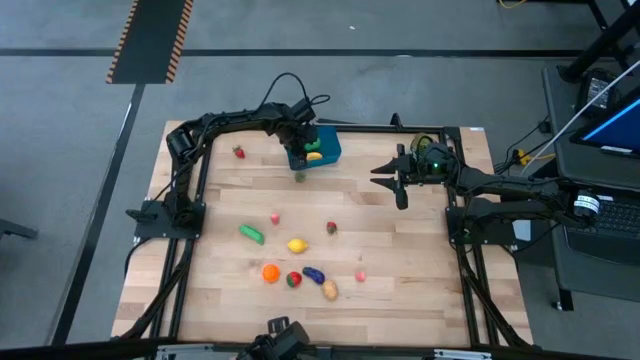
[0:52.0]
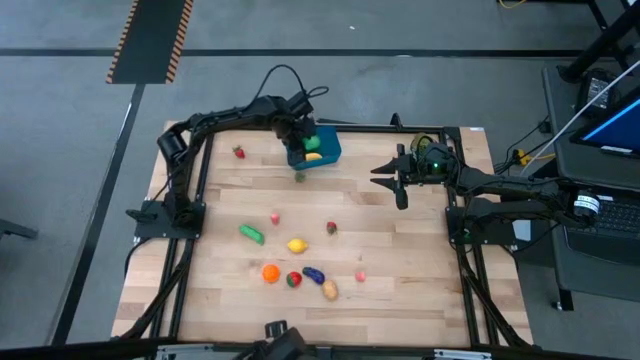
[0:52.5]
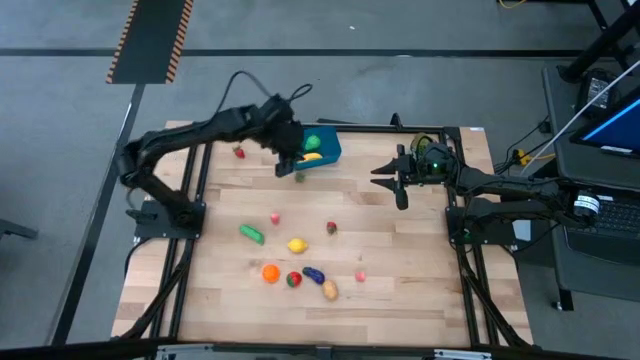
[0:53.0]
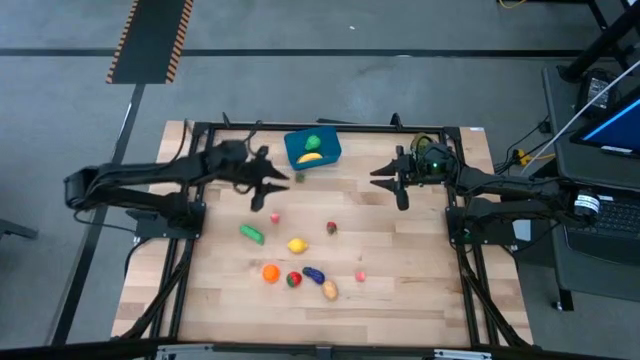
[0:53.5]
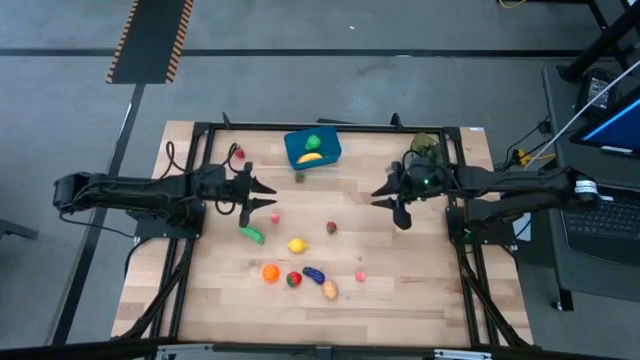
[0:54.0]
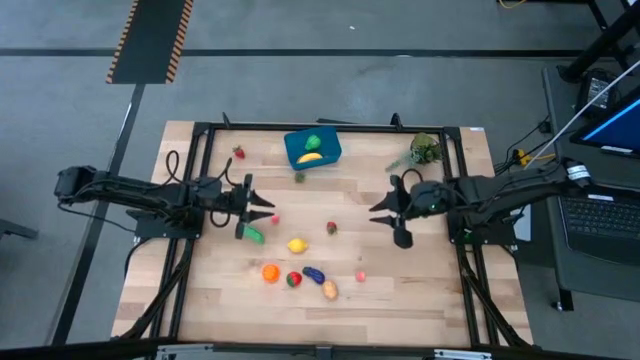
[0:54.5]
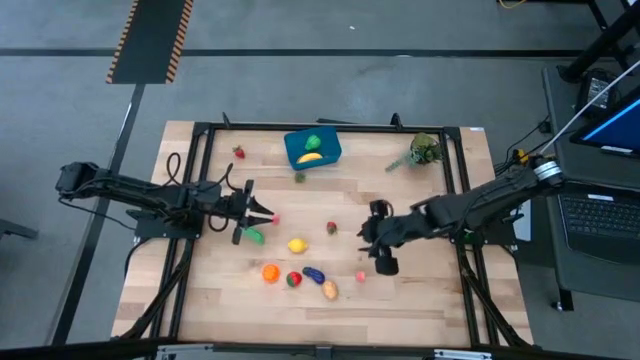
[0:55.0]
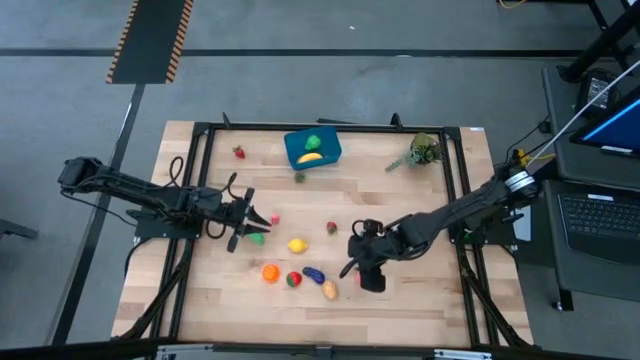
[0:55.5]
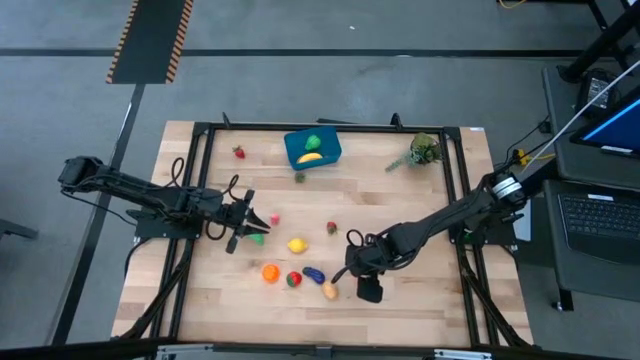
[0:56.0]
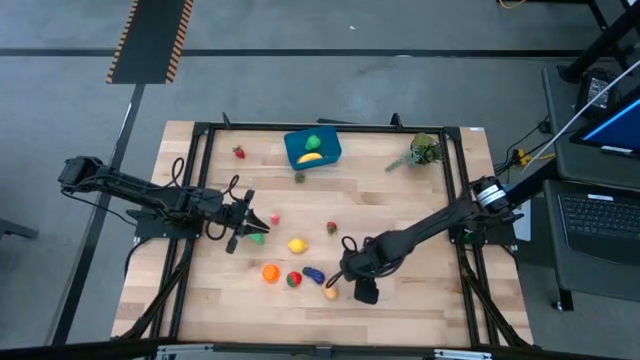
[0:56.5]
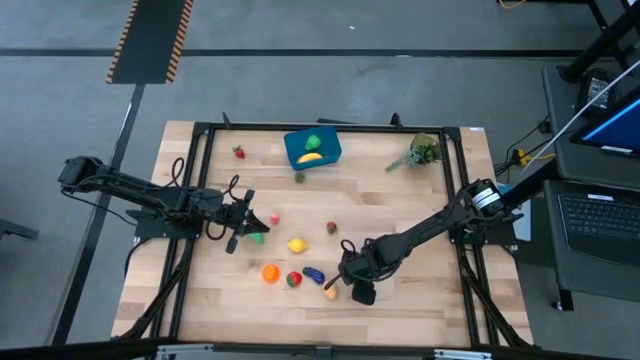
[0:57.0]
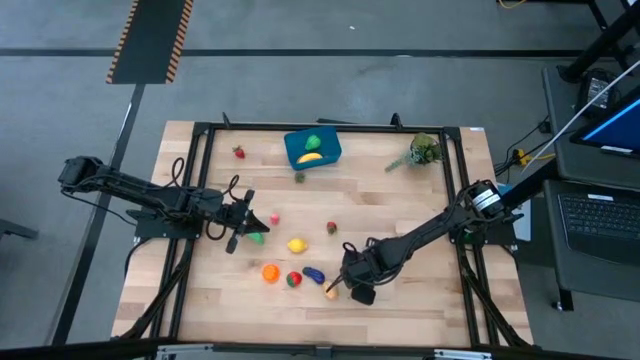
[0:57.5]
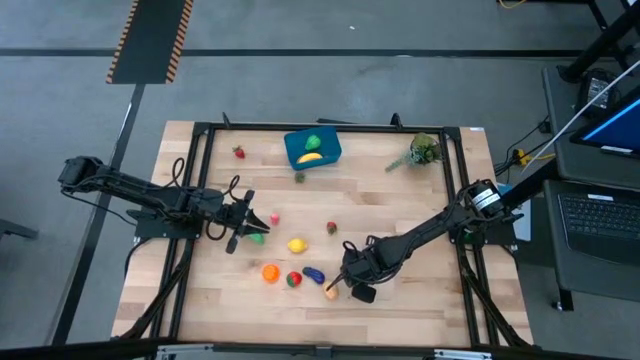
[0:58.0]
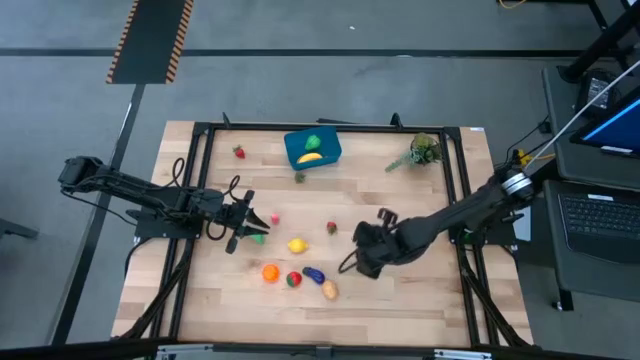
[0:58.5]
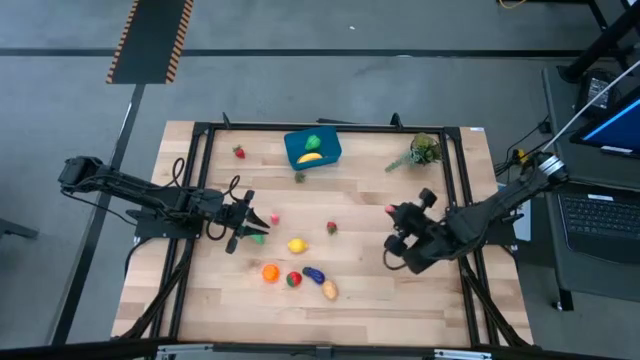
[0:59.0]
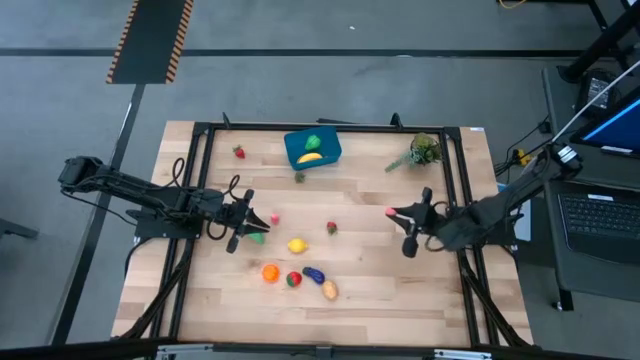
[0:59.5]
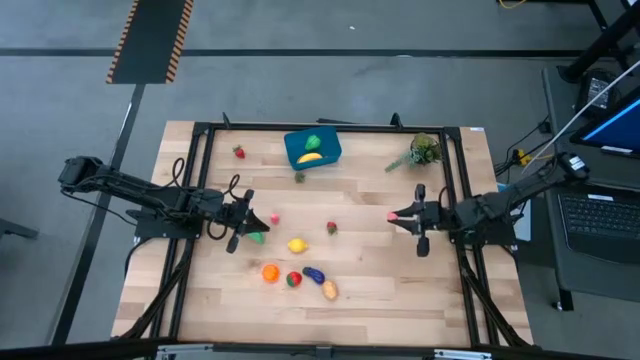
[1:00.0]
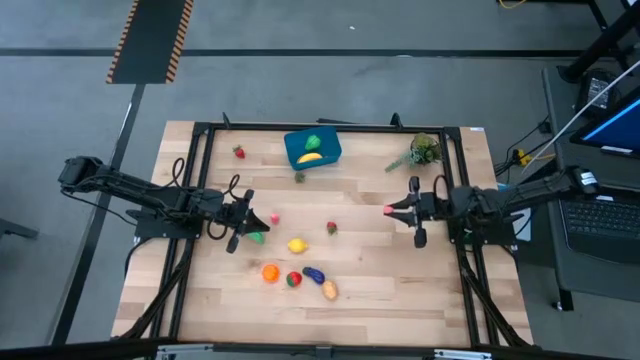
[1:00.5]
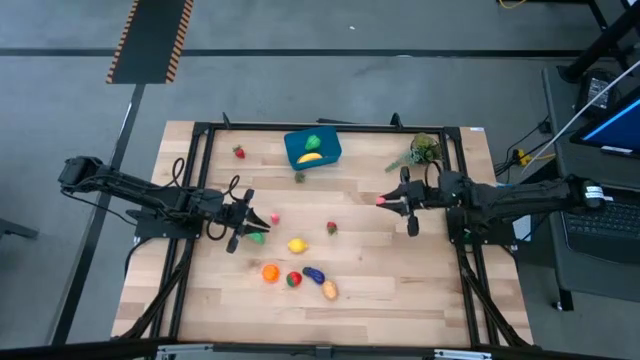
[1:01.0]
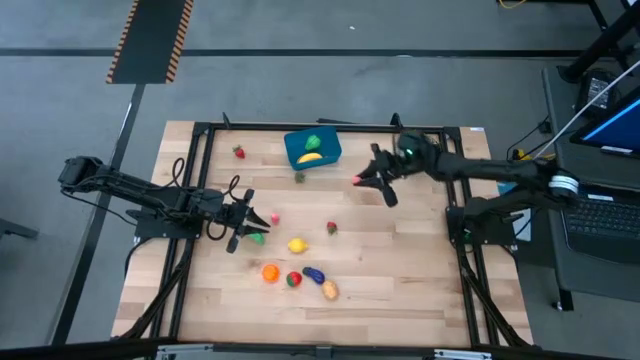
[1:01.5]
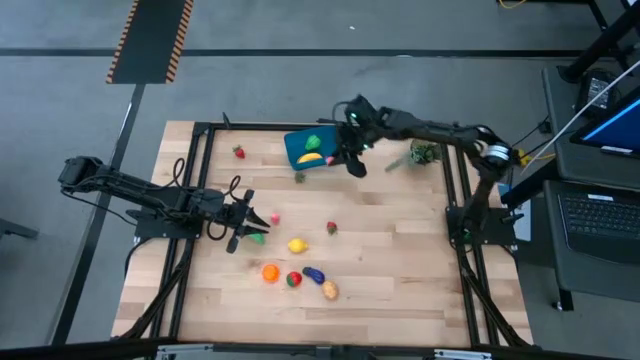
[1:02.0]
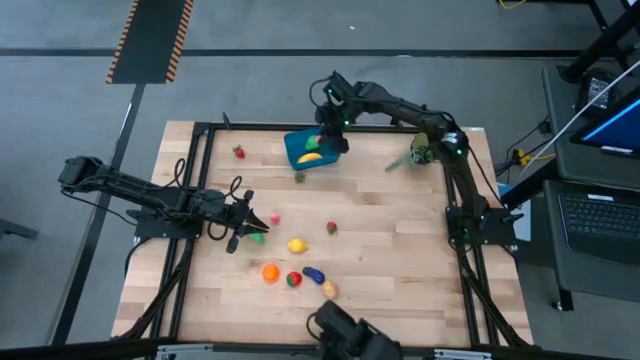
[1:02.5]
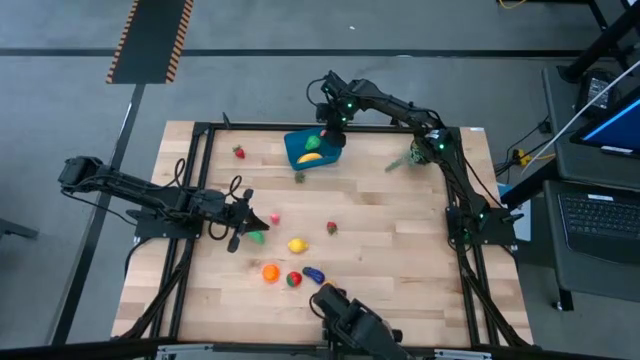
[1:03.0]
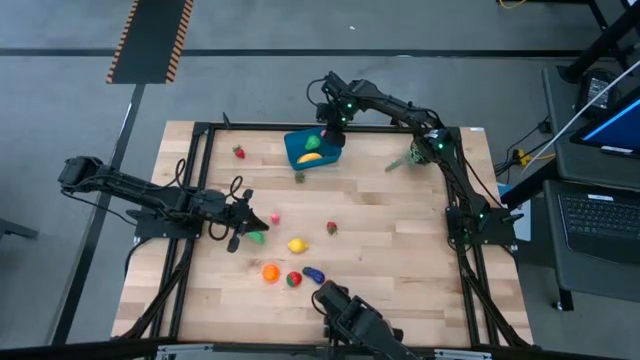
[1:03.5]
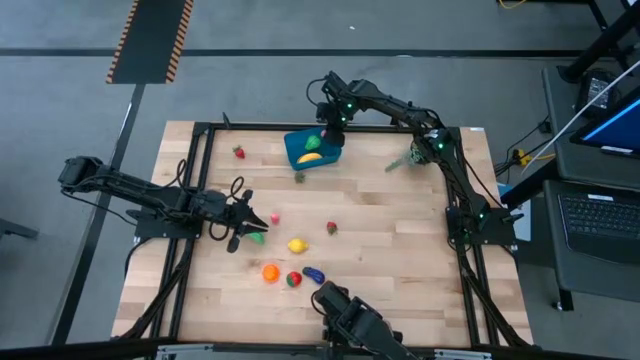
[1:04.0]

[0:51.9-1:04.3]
Task: Pick and placing Produce into tupperware
Put the peach into the blue bin

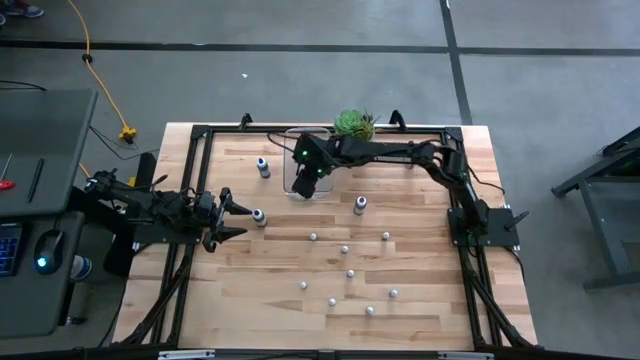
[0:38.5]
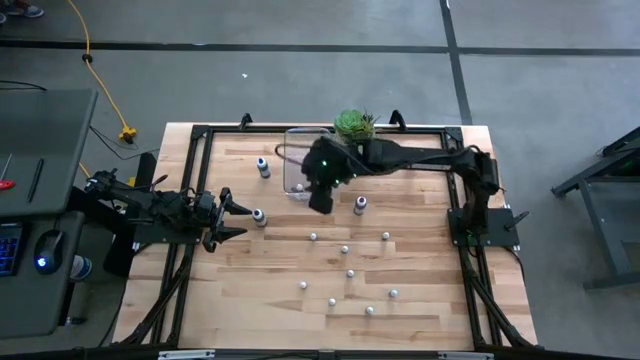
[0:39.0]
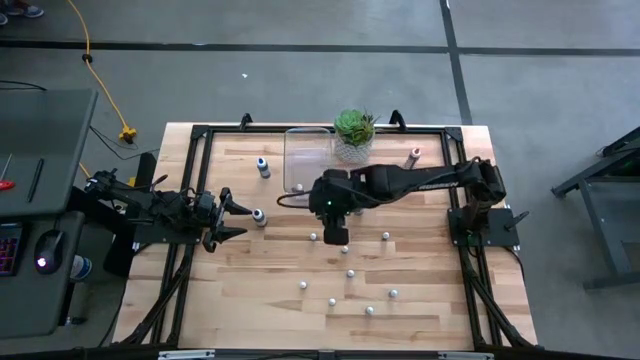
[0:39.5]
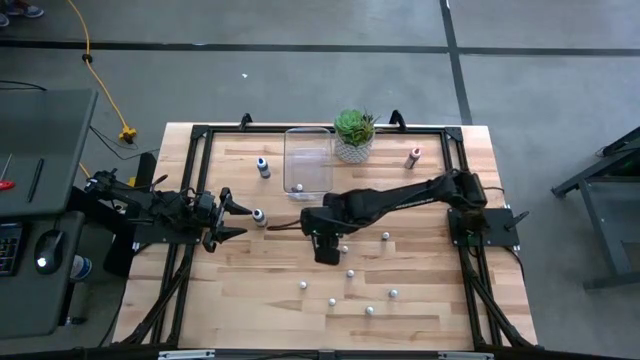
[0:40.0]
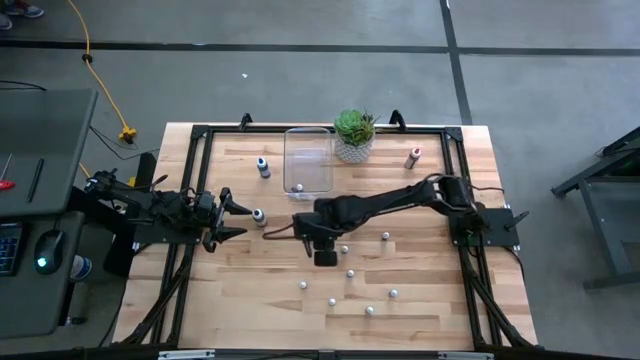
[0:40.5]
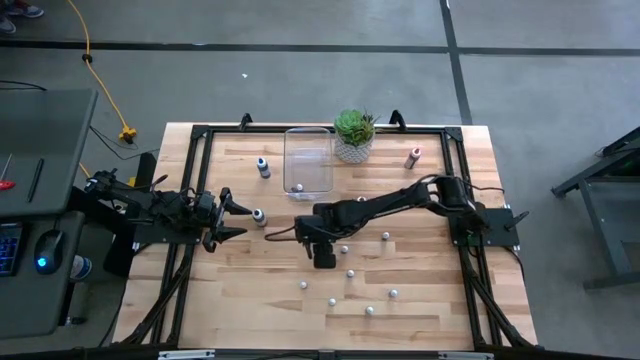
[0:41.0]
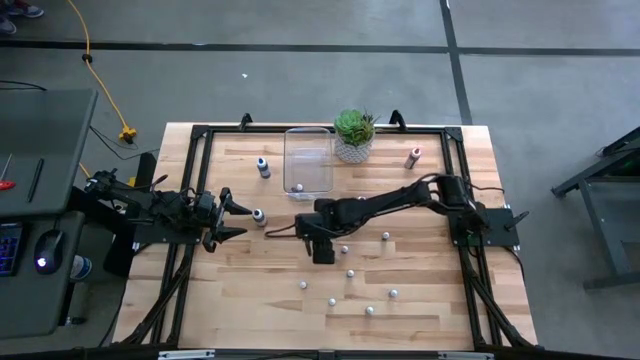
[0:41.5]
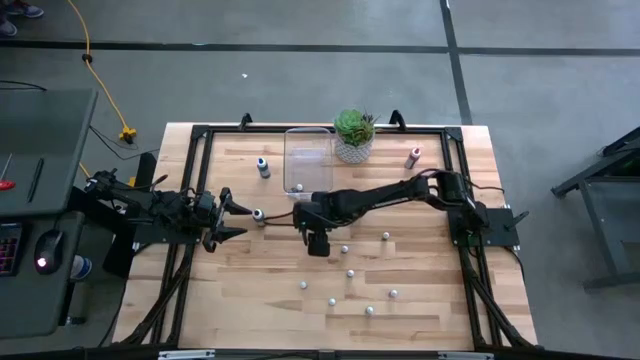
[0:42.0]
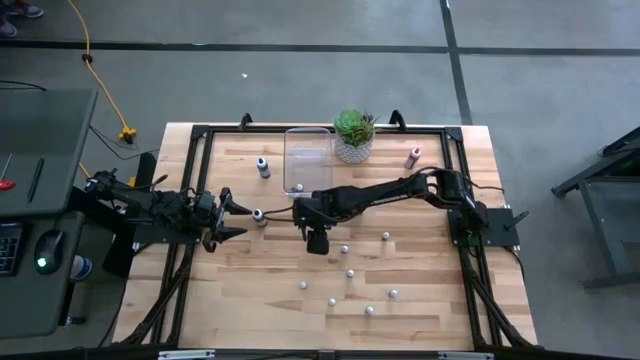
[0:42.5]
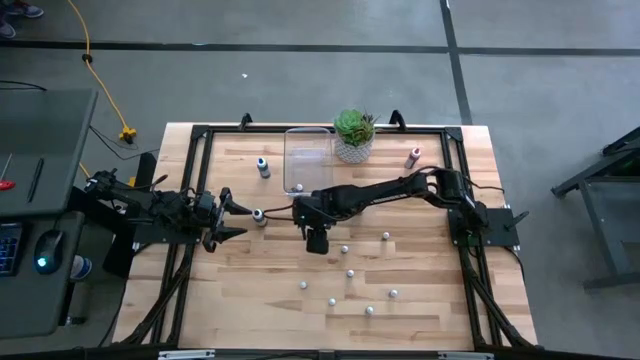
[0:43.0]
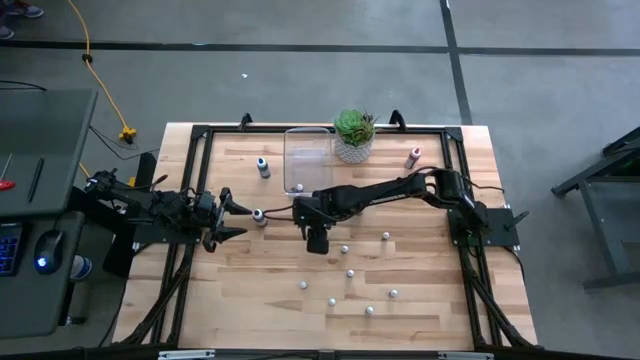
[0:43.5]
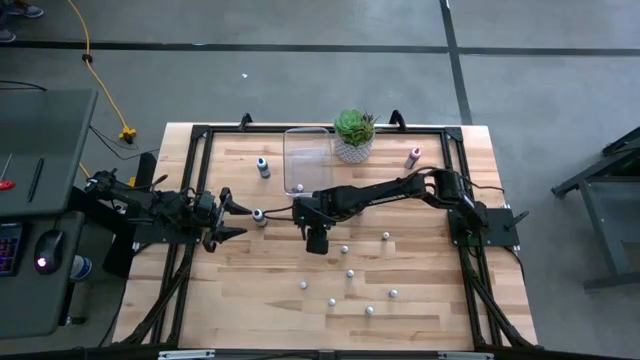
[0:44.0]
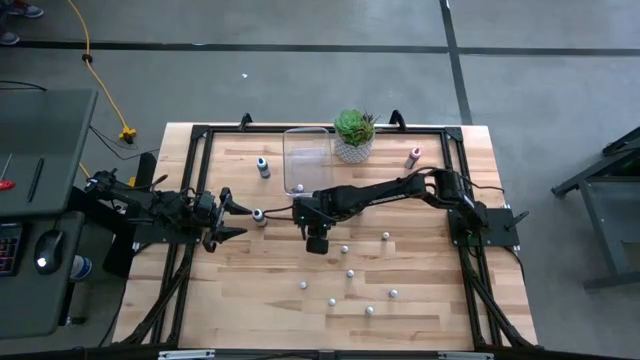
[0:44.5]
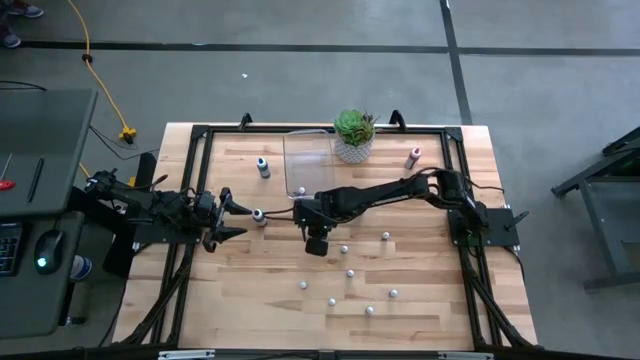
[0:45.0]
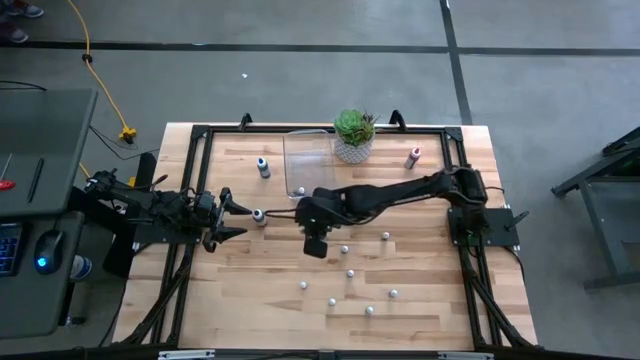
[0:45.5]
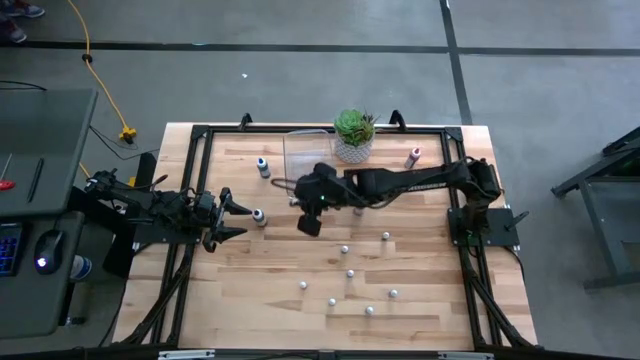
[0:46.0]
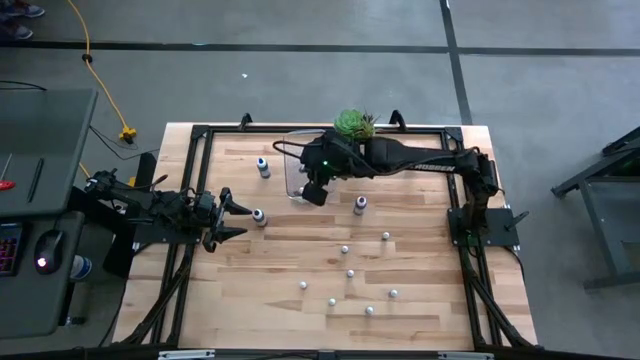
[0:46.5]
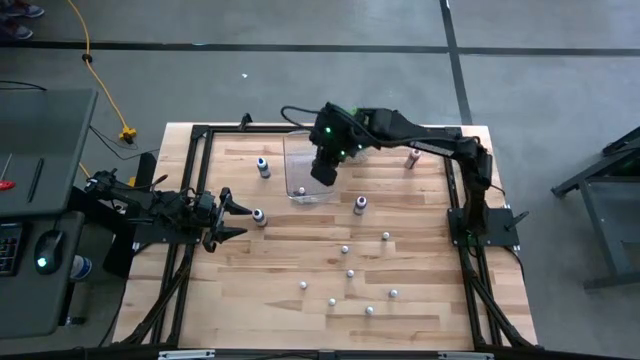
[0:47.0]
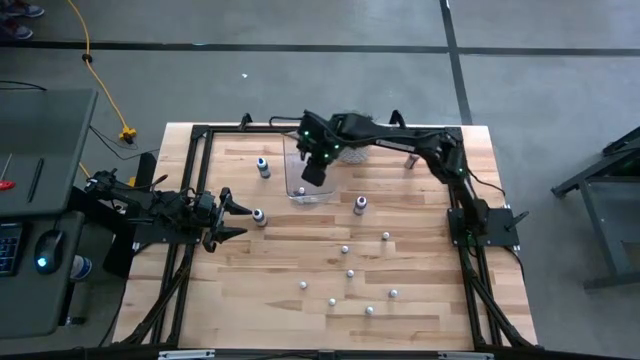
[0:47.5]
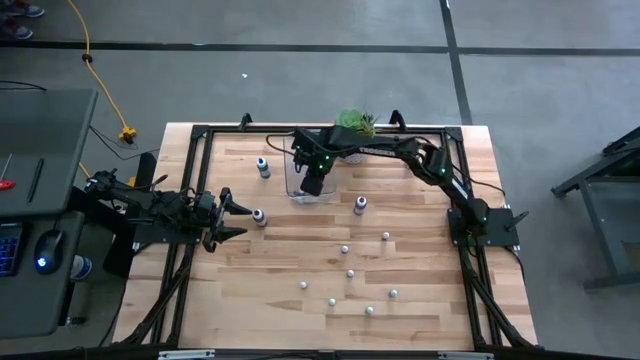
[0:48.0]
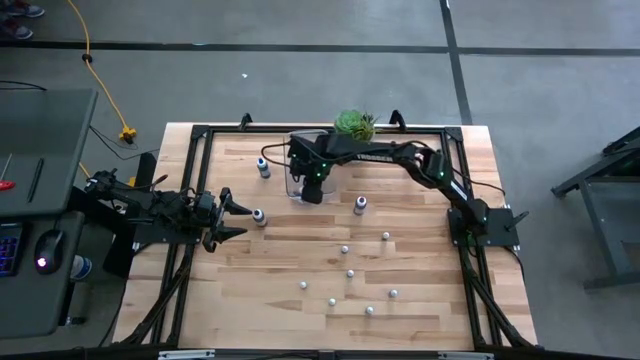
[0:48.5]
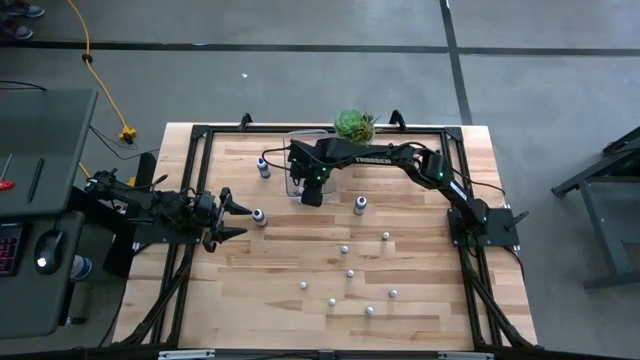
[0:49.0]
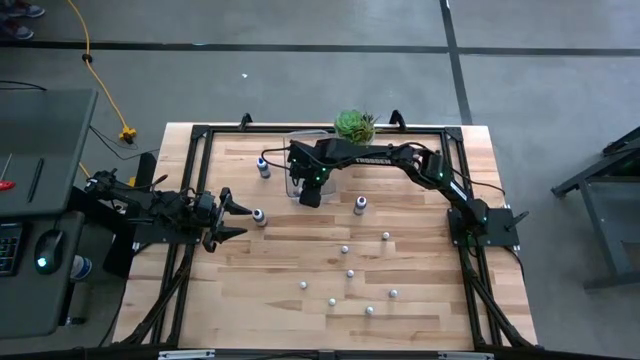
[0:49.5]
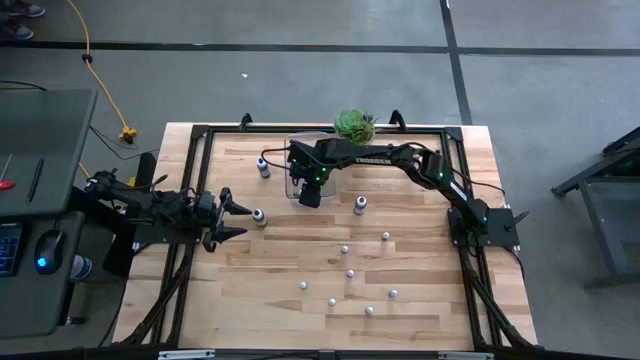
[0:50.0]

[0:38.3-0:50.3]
Task: Pick & Place food coloring
Put the small green food coloring bottle into the transparent bin
